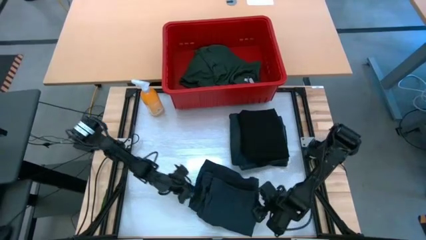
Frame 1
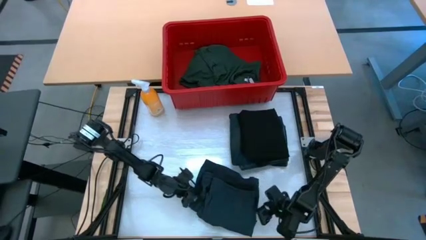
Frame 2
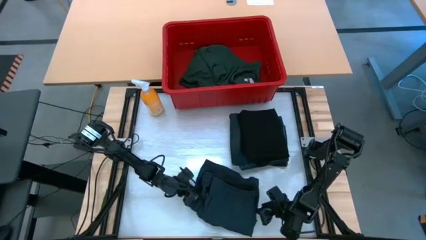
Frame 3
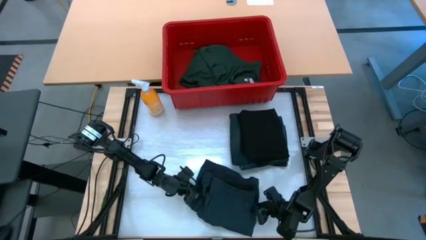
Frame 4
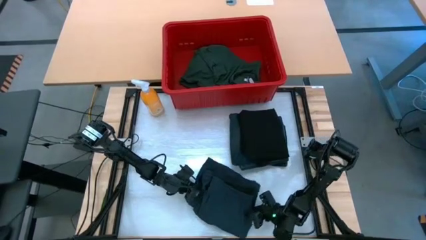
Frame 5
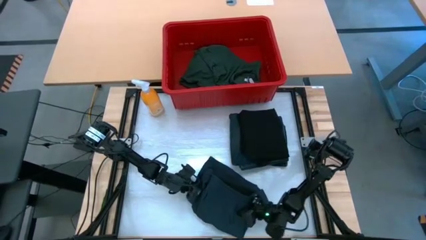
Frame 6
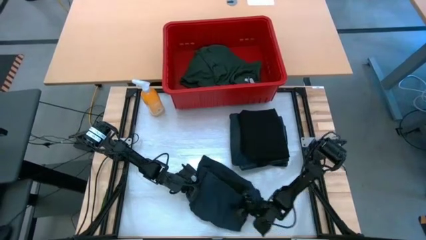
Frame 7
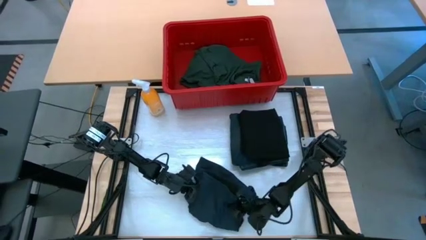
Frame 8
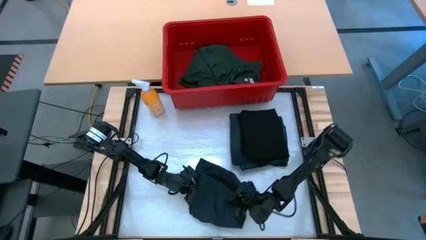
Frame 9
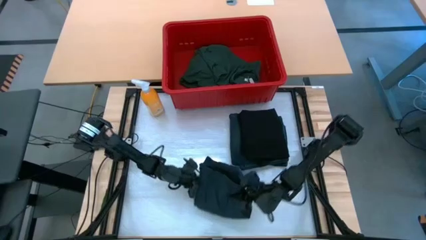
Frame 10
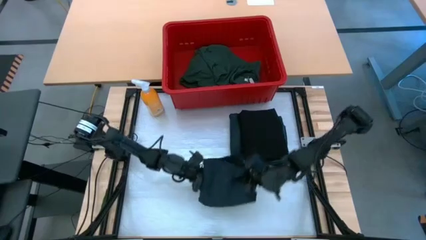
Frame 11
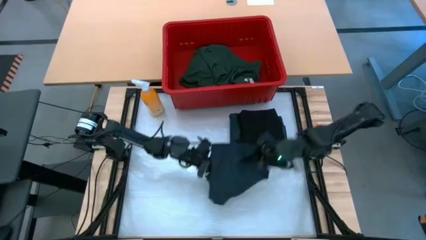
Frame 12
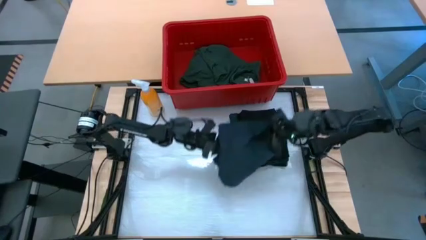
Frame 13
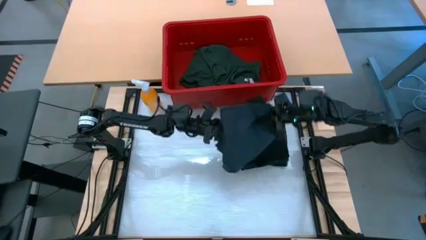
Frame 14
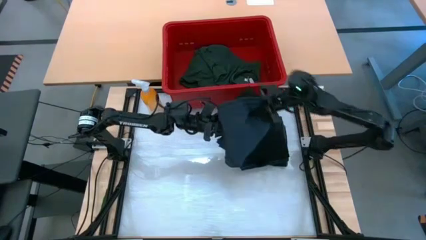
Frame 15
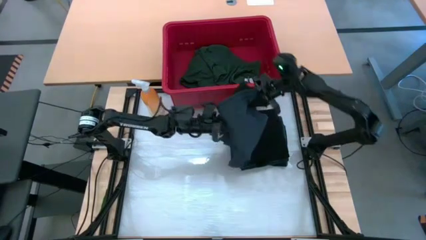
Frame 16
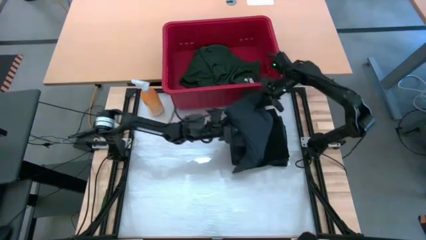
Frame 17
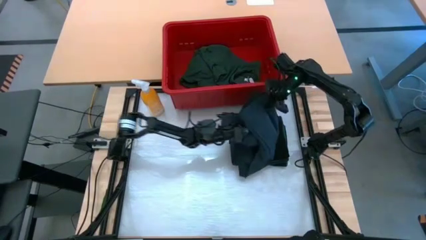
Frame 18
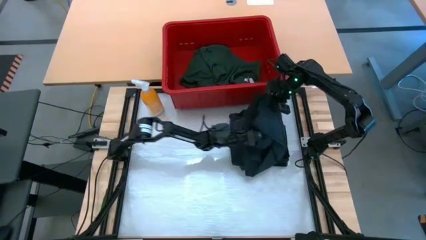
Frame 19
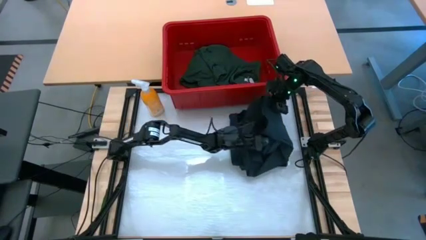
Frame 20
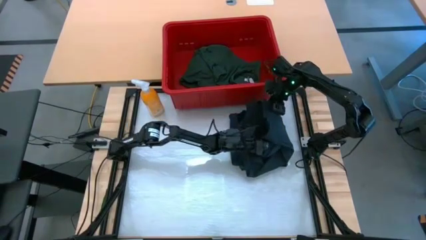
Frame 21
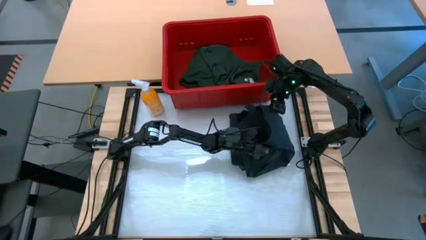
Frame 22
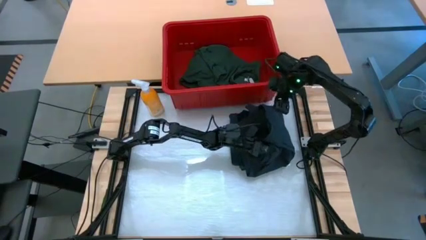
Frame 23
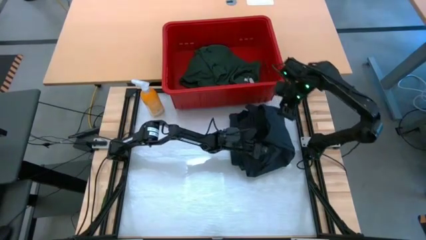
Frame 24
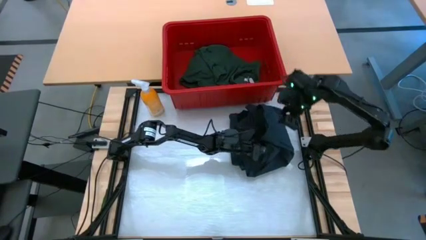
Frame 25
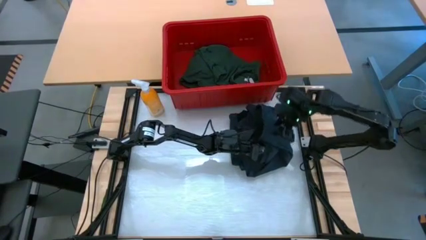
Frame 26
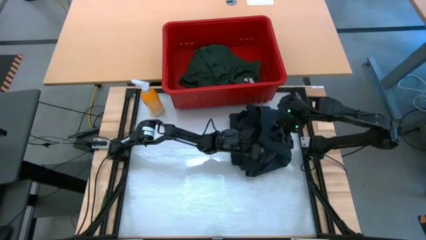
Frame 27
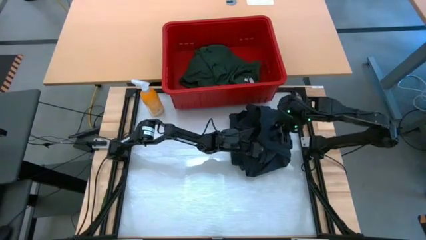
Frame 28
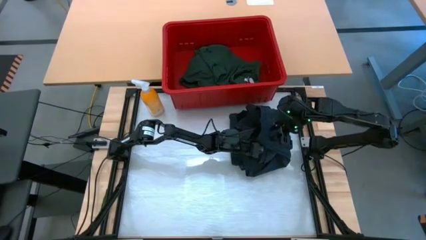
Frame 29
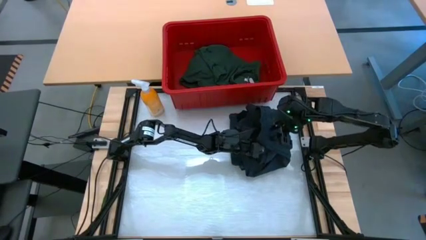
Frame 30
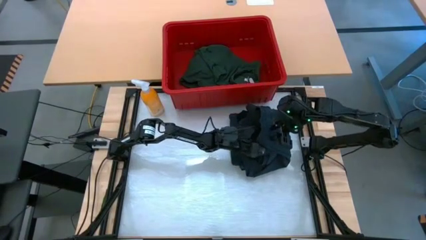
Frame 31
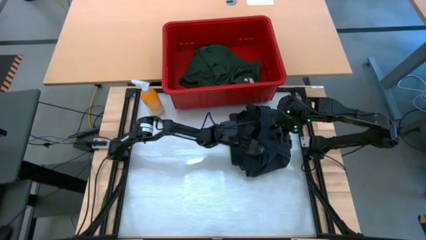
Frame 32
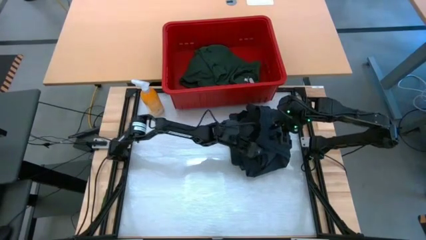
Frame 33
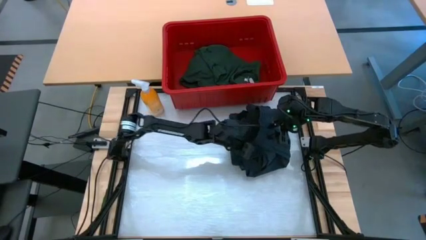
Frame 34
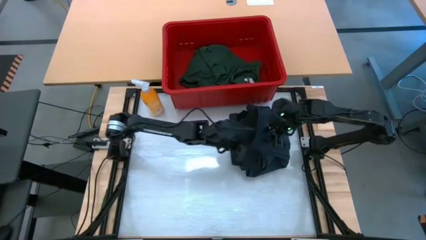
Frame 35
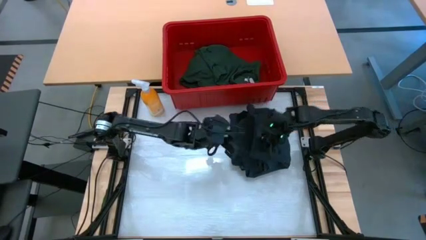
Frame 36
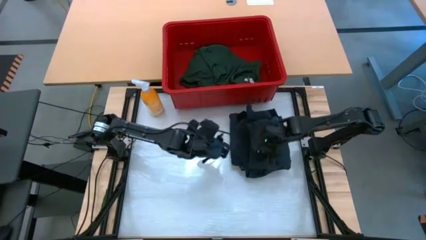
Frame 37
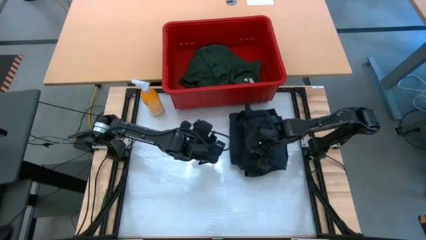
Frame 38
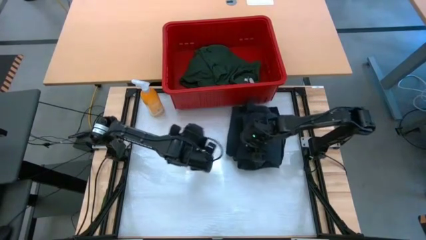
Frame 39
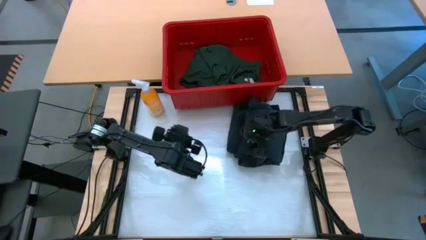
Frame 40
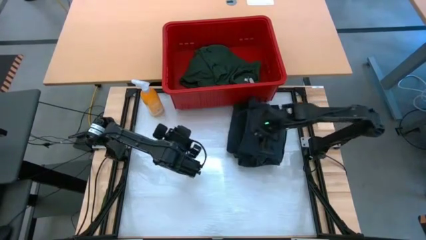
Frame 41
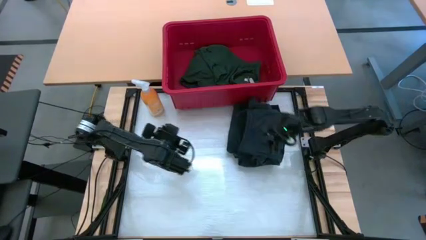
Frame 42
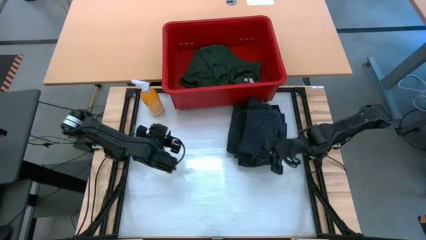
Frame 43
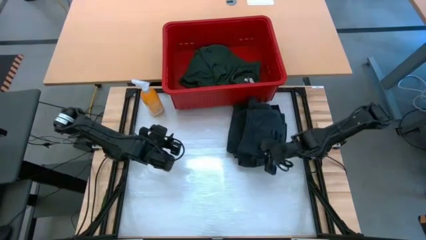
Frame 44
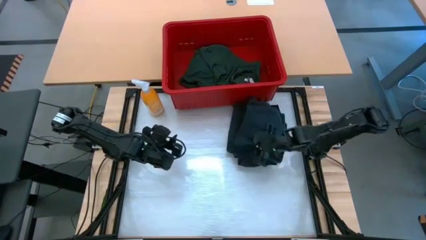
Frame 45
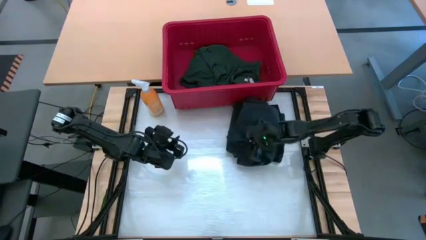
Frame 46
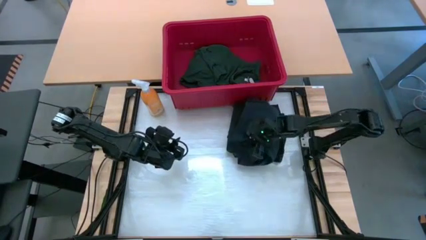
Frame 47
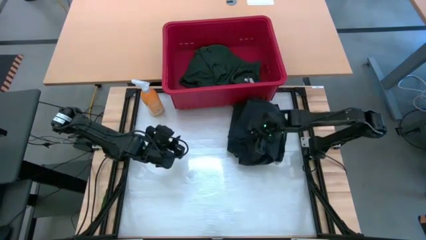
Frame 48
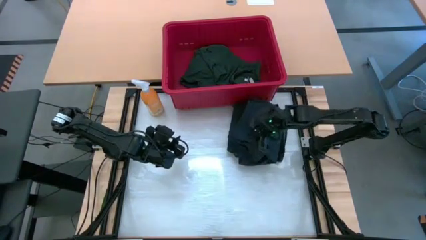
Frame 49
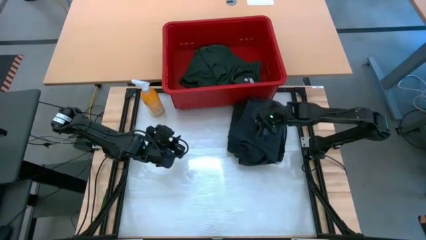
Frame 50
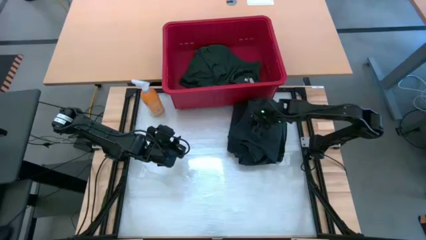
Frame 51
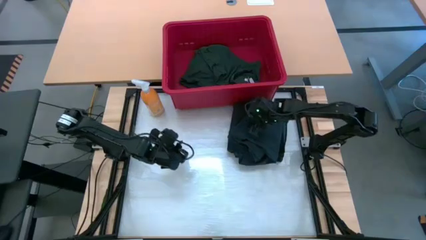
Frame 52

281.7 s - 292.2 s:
Task: Fold Laundry from Bin
Stack the black shorts on top of the black shirt

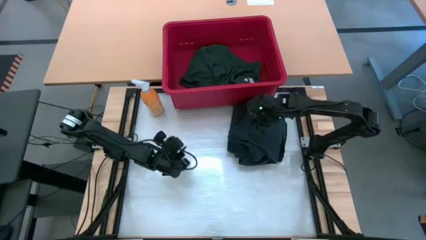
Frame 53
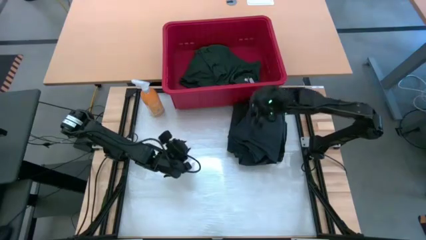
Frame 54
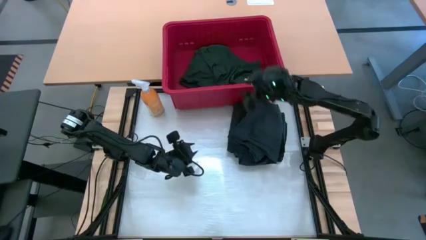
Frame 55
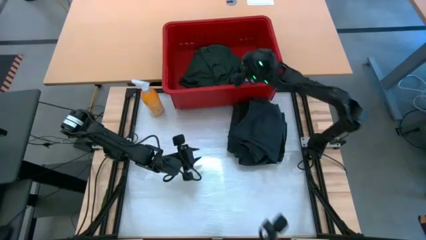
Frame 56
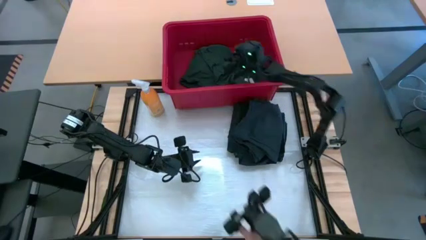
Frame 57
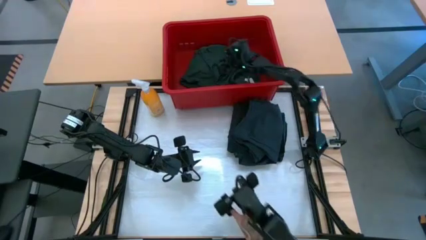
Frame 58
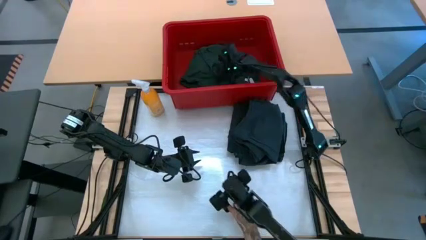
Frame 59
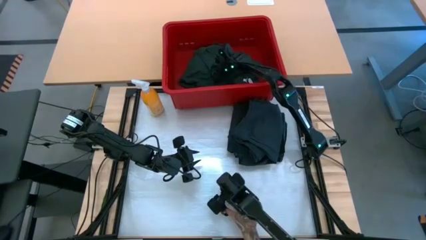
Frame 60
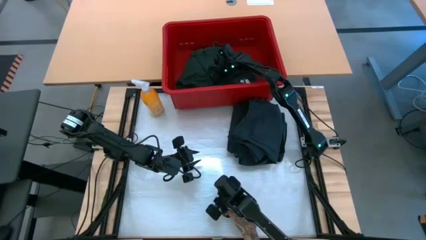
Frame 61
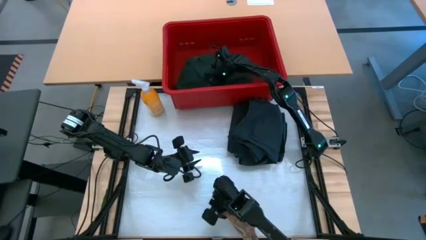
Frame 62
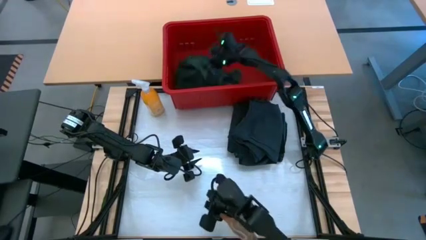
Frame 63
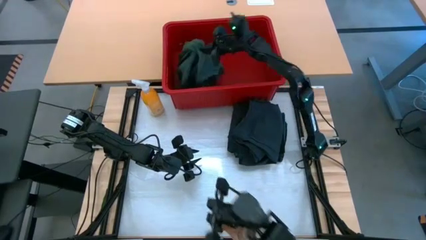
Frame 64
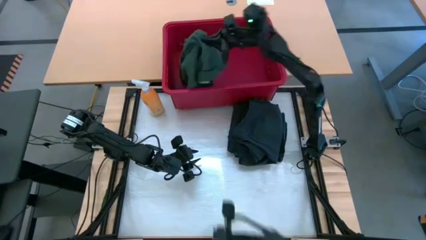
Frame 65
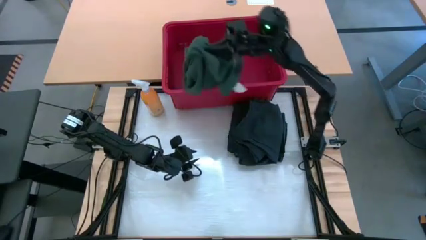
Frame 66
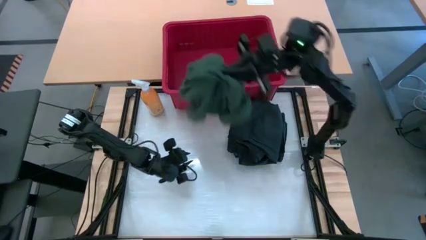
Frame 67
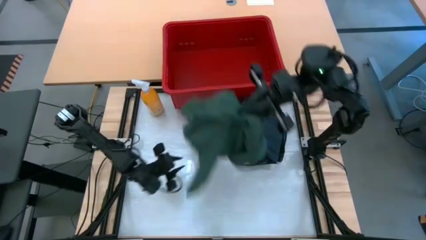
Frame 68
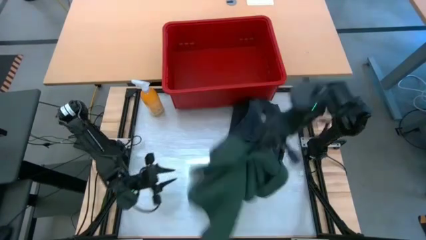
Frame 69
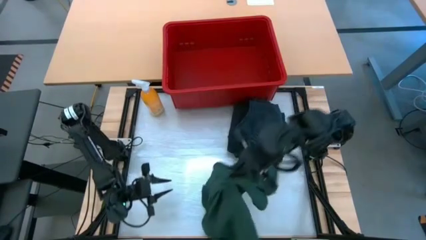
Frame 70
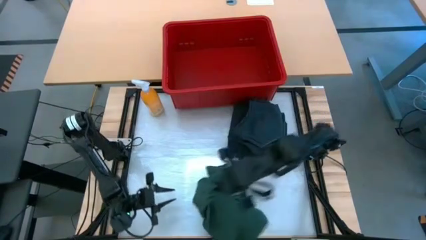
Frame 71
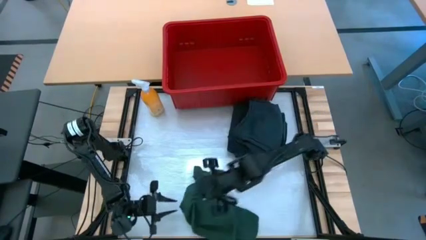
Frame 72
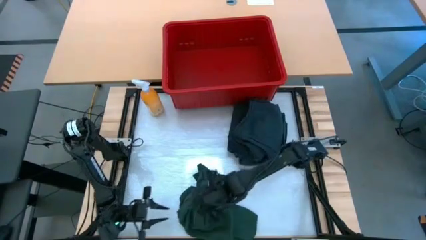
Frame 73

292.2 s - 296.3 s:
Remove the green button down shirt from the red bin
